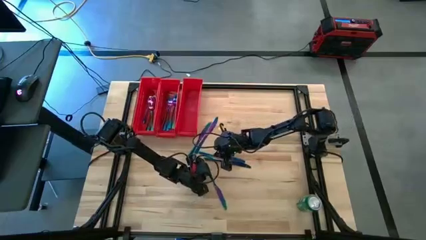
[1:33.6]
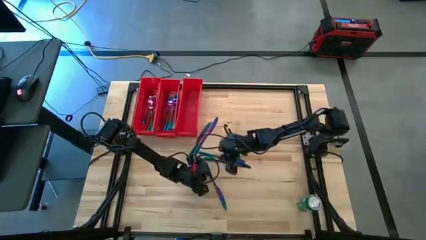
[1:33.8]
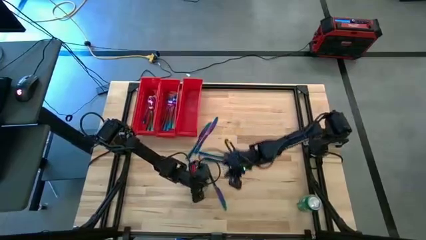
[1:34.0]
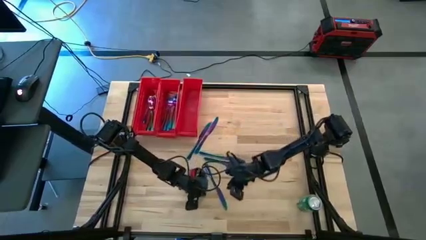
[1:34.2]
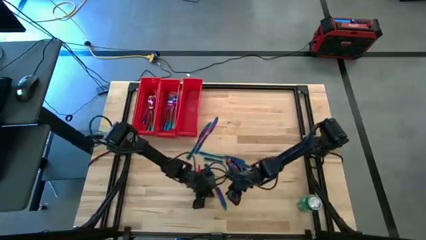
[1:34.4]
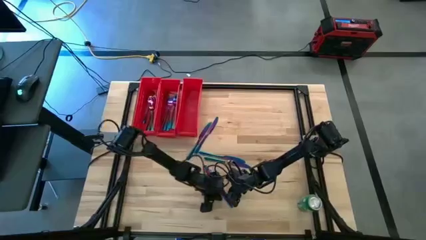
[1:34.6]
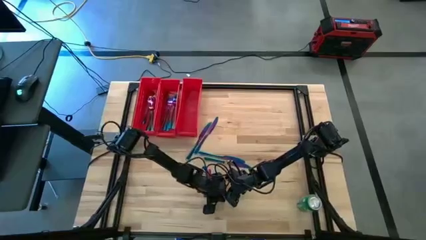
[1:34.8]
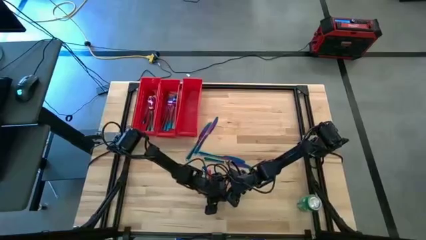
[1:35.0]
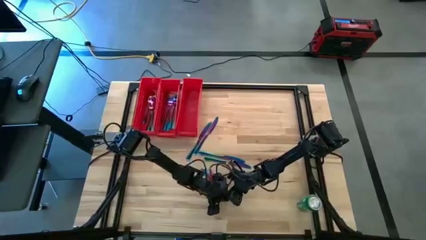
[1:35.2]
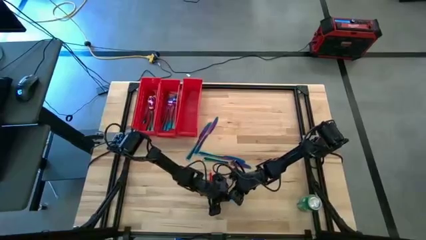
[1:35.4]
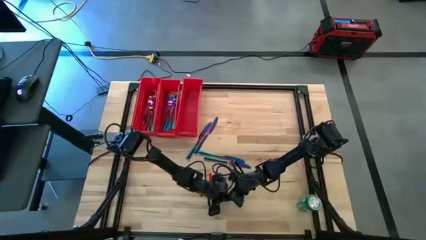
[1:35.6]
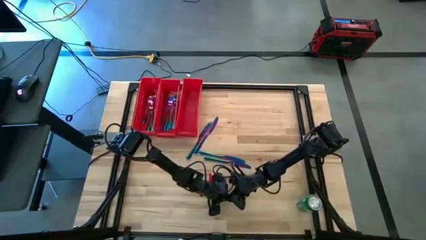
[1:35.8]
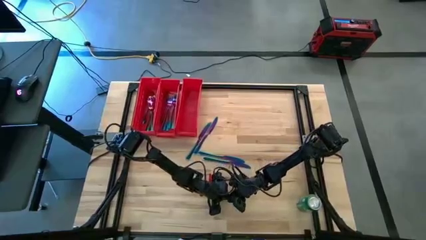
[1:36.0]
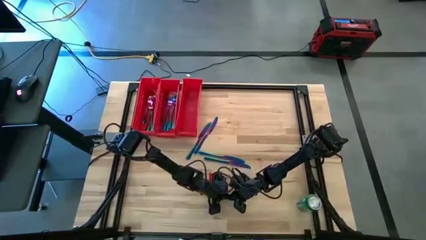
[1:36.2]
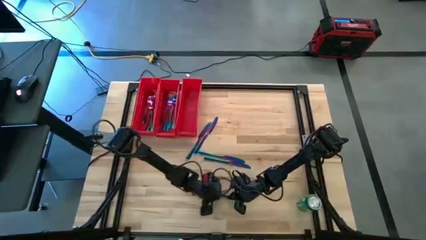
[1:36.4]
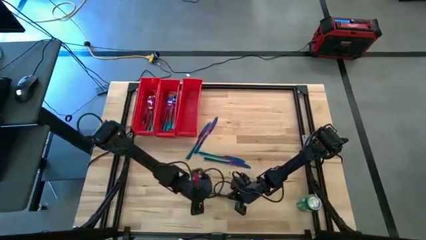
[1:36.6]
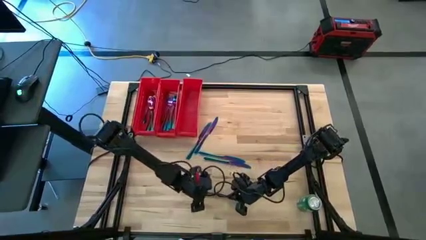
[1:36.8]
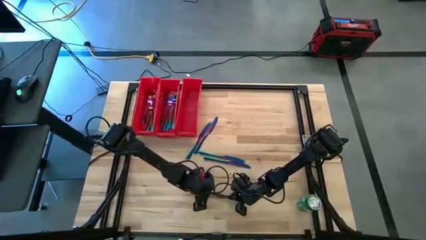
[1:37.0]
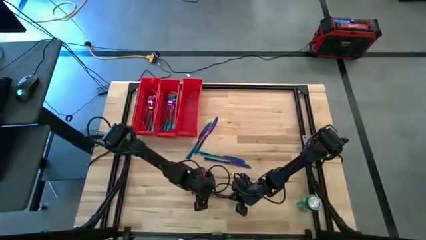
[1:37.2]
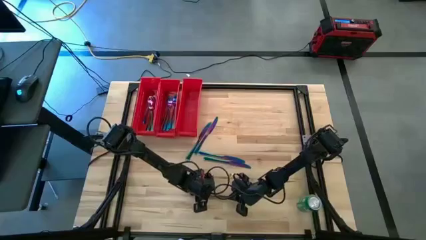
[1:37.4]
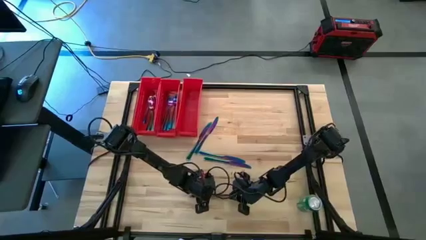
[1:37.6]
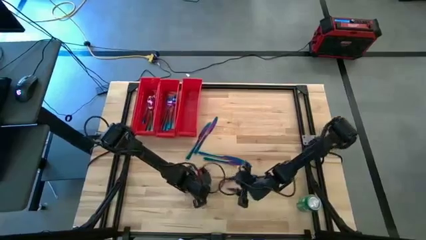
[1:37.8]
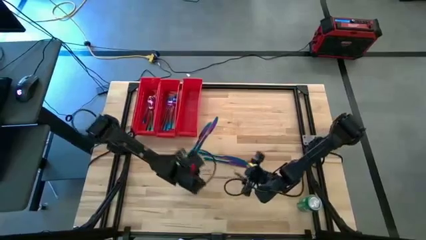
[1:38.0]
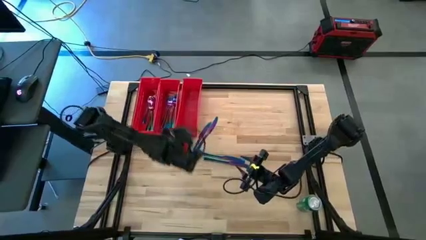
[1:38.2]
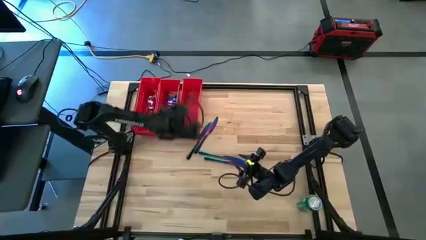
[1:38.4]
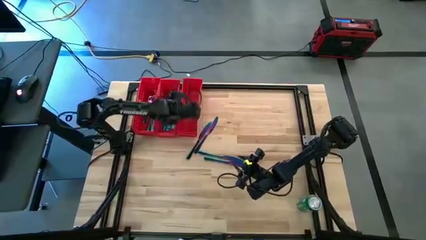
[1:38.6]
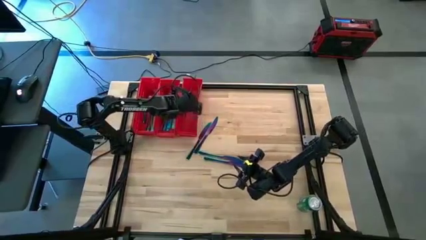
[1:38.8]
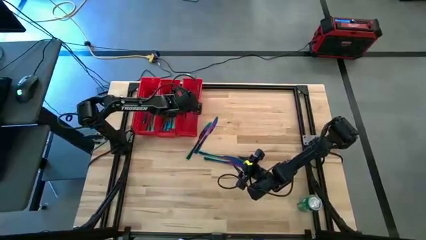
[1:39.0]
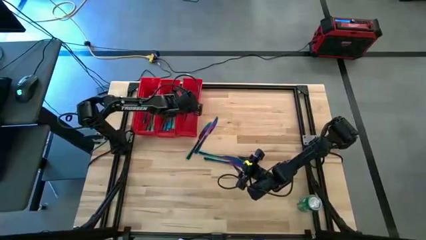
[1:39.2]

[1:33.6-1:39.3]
Task: Sort silverware
Put the blue knife into the right red bin

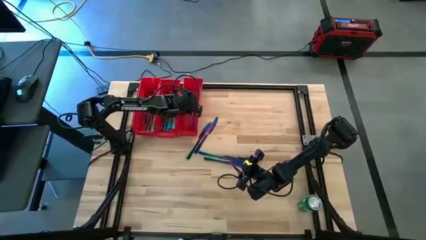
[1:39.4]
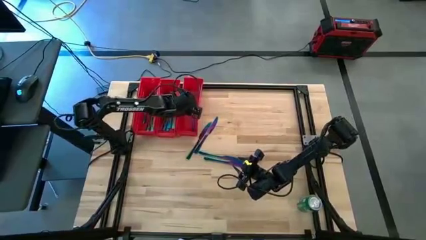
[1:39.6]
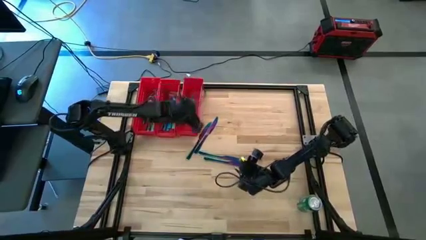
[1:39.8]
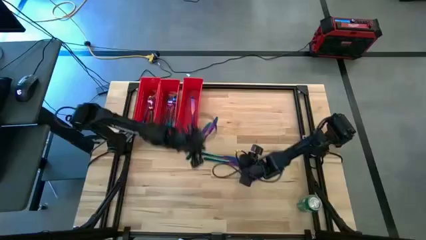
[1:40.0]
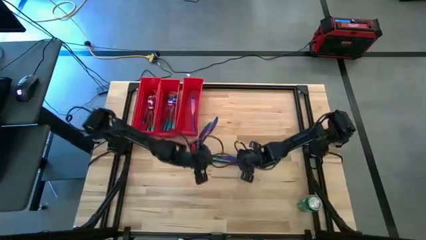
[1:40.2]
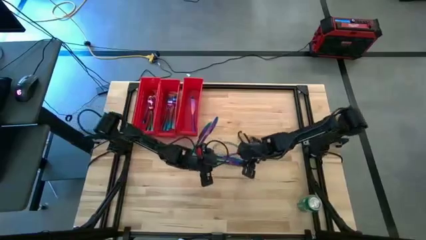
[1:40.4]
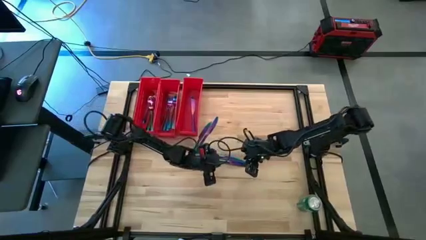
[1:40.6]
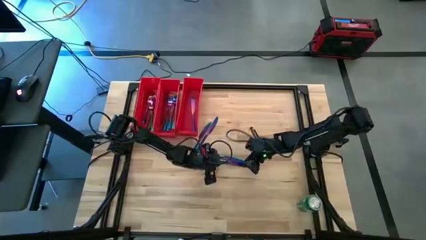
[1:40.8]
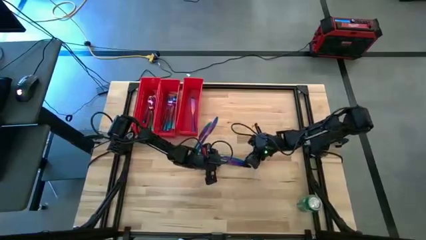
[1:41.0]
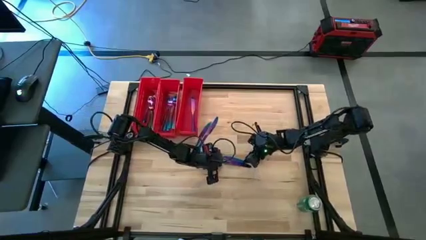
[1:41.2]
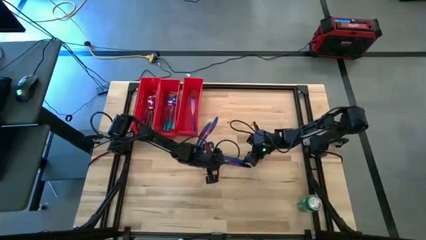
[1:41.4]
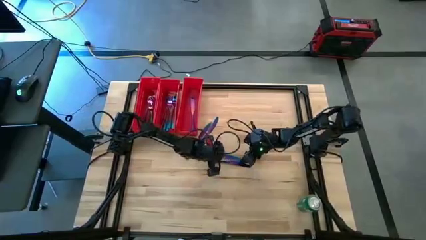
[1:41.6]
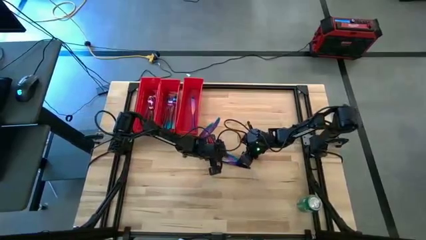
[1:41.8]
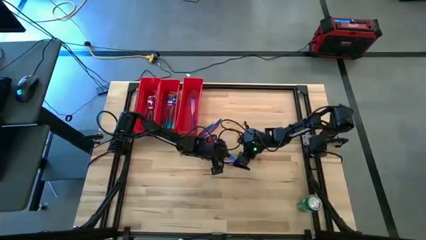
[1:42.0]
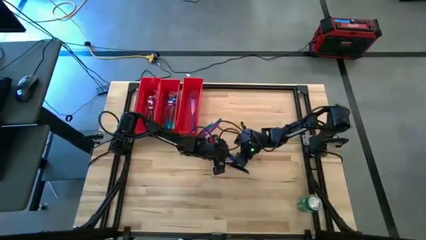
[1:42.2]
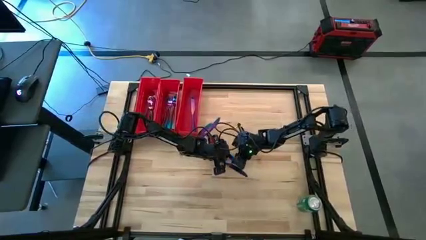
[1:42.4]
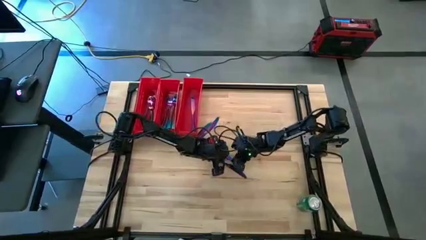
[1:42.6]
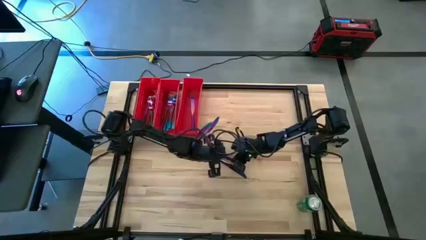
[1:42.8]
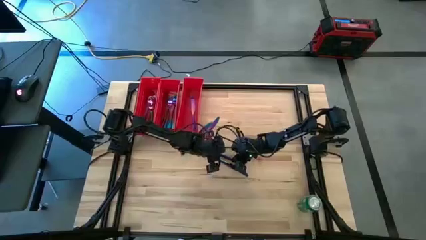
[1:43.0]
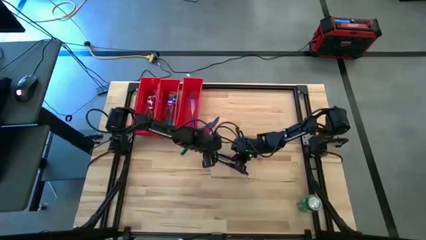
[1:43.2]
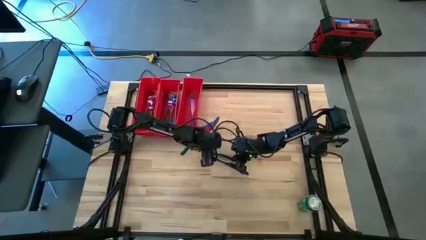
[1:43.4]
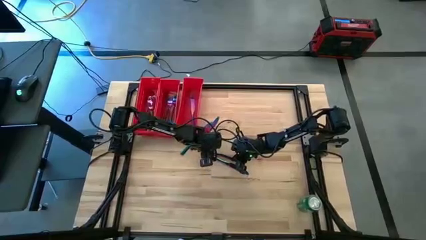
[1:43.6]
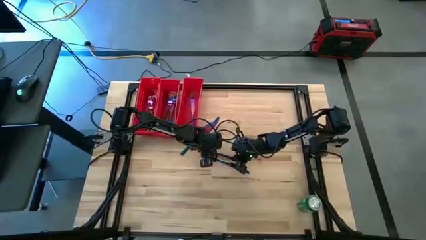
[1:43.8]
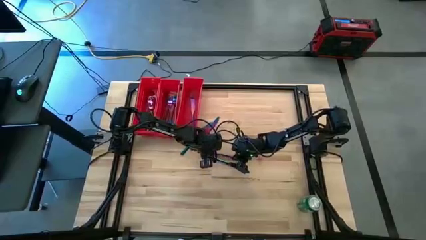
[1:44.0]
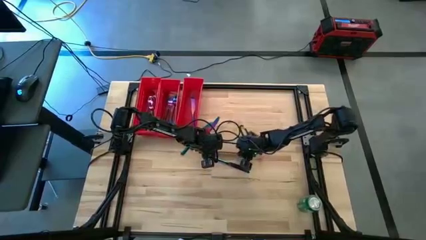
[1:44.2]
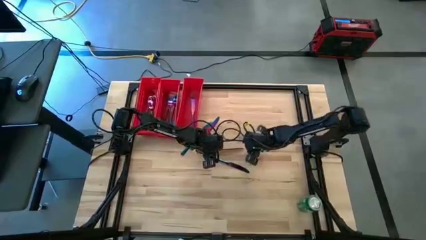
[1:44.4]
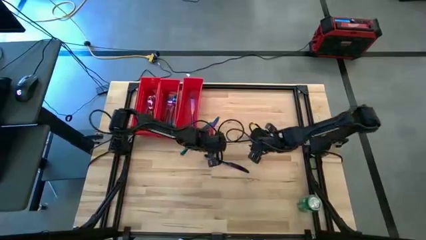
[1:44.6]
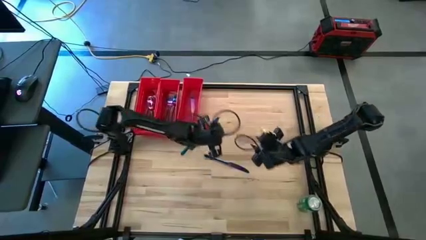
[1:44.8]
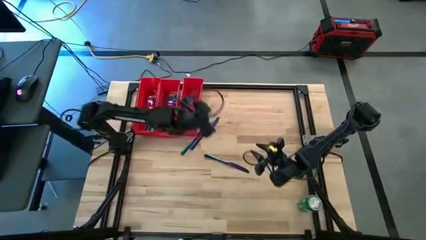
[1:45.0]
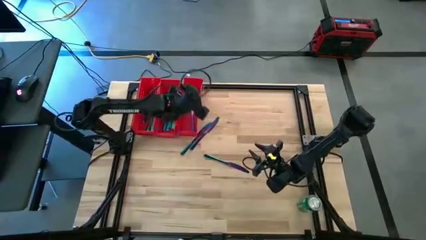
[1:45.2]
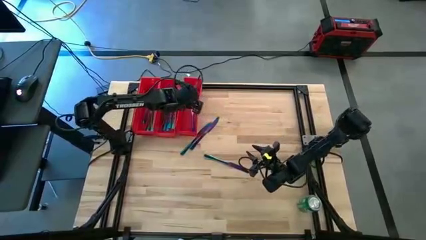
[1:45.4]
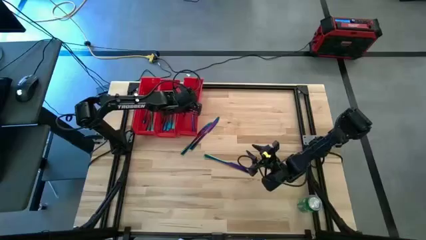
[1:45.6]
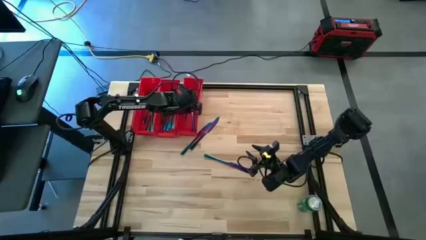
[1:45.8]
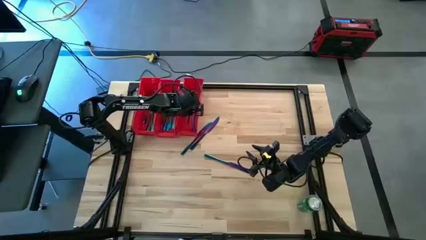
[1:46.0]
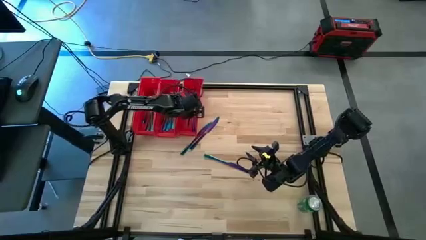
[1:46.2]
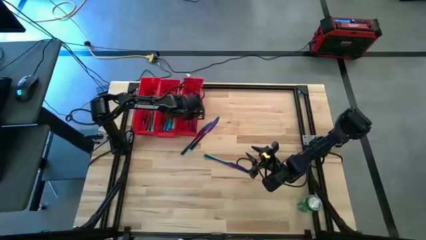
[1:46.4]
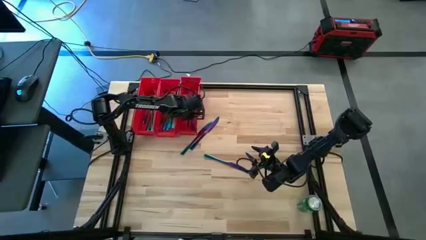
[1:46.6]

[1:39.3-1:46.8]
Put the blue knife into the right red bin

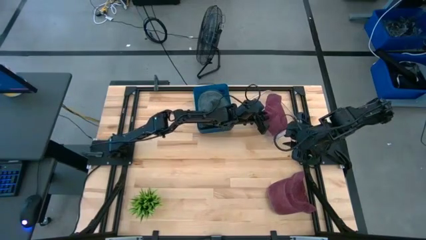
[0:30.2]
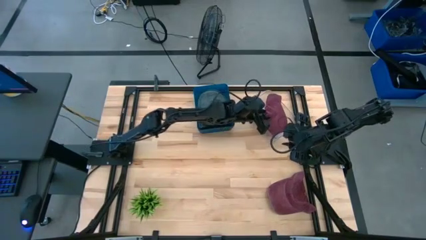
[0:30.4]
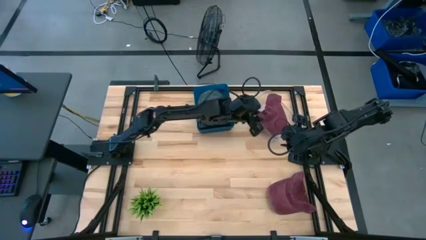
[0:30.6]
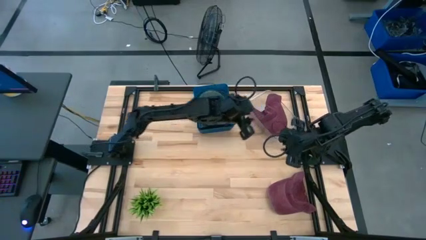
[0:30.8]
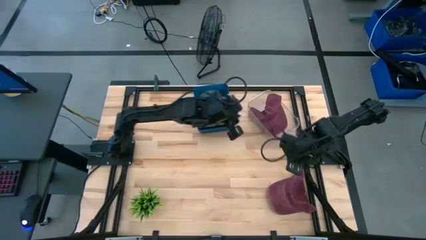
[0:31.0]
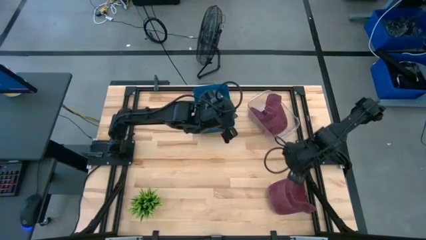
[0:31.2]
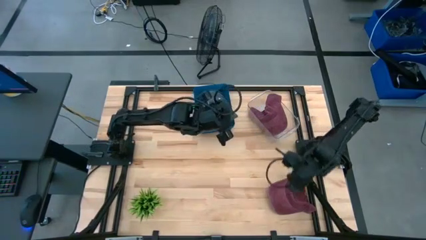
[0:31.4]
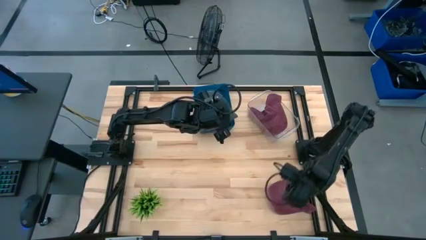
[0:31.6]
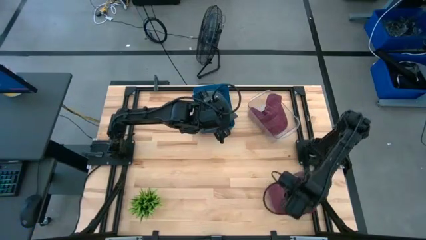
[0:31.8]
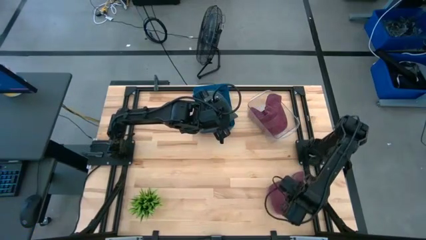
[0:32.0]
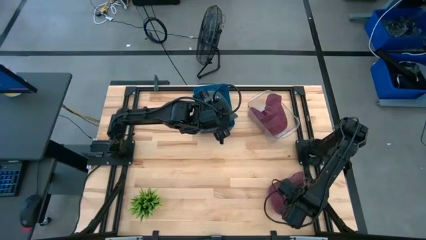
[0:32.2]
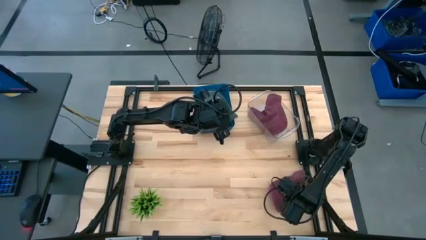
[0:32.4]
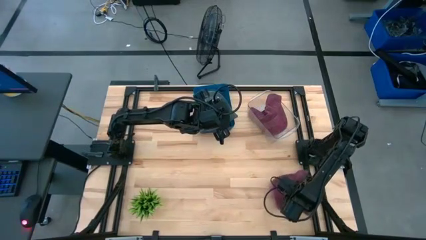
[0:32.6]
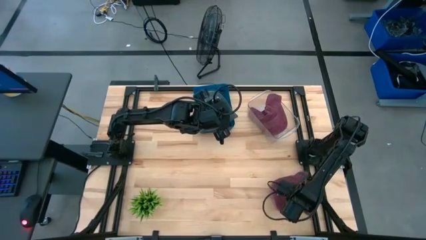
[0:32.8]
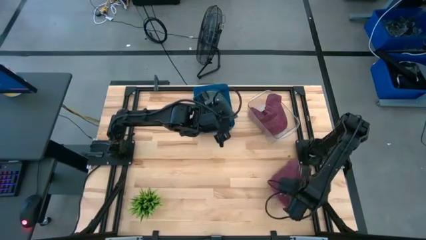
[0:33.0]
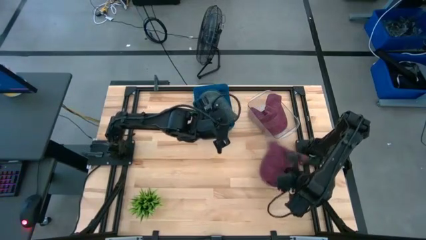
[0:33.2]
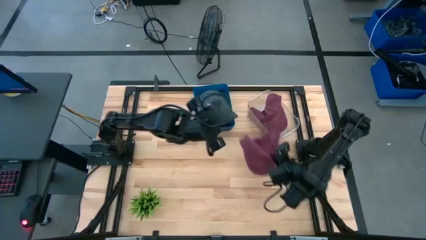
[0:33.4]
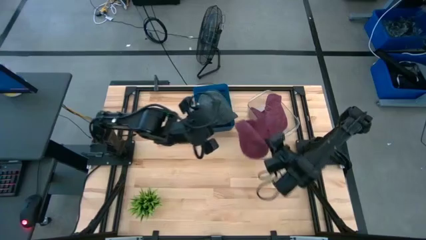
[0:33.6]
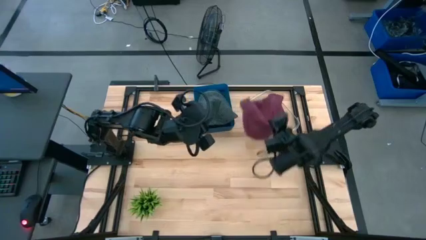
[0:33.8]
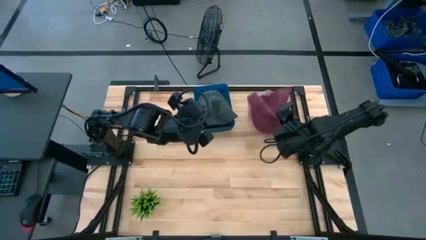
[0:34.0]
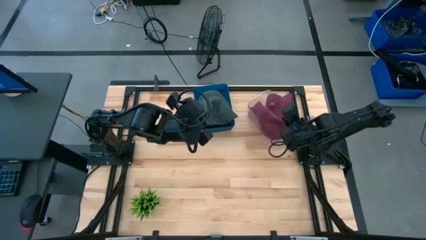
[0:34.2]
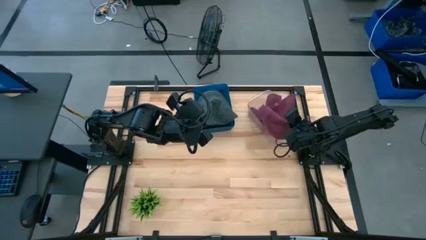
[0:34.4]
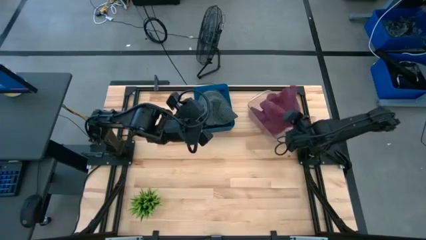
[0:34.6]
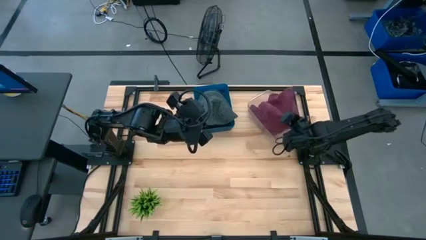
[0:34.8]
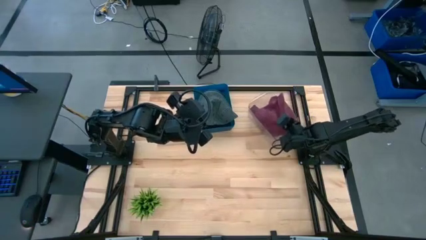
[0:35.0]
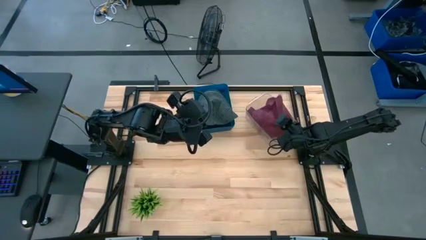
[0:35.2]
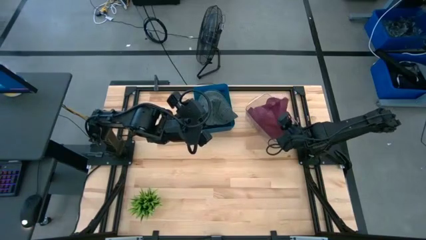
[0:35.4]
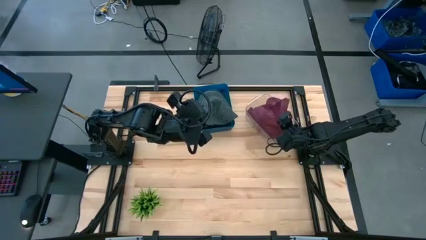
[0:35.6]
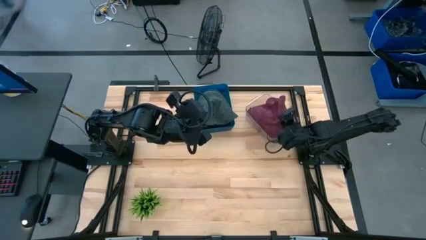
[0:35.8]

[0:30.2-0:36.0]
Task: Pick & Place hat
Put the red cap into the transparent bin
